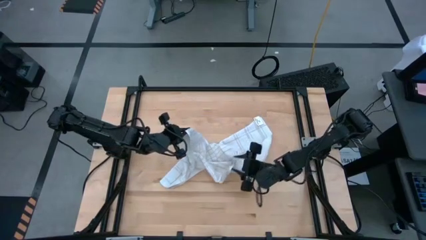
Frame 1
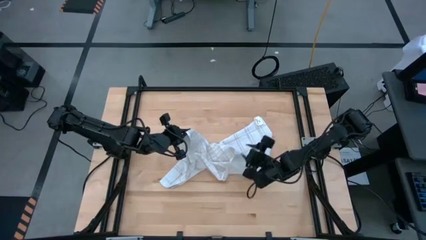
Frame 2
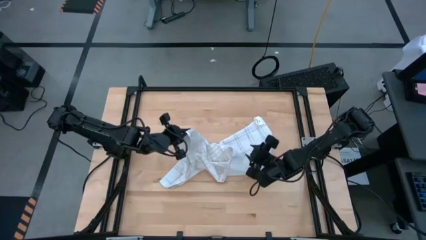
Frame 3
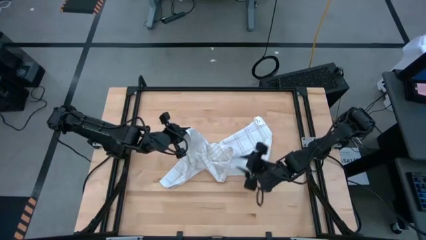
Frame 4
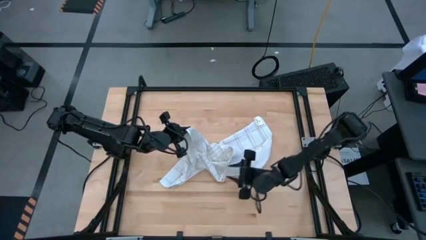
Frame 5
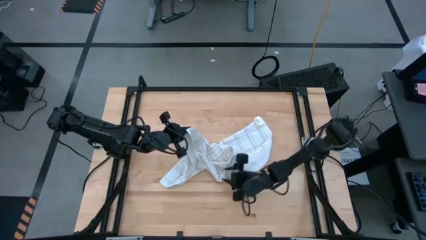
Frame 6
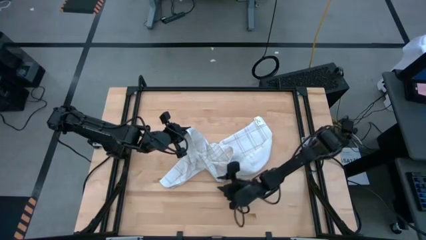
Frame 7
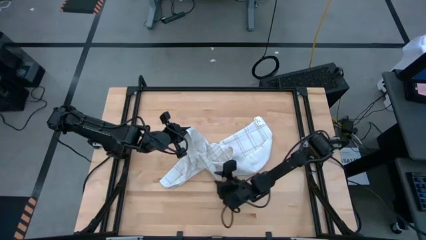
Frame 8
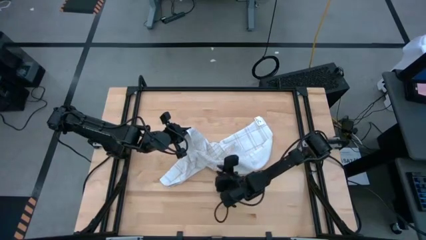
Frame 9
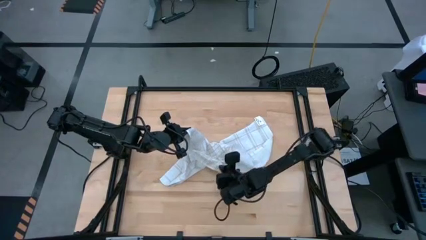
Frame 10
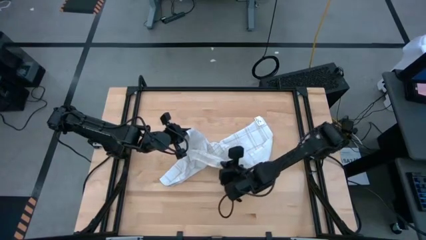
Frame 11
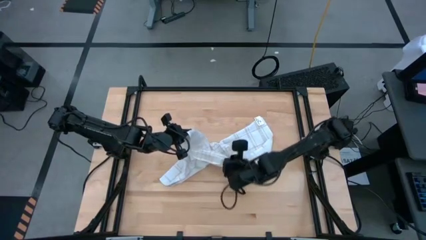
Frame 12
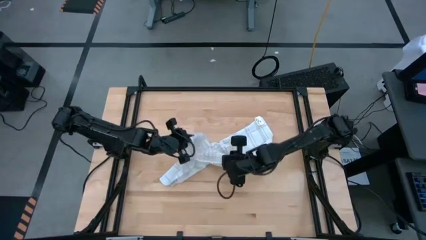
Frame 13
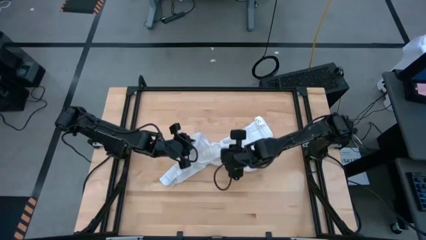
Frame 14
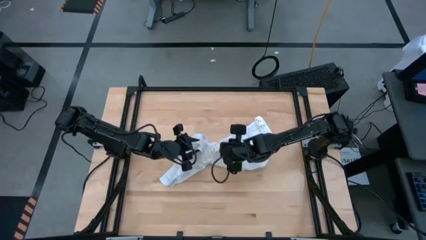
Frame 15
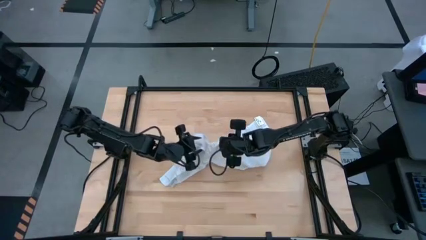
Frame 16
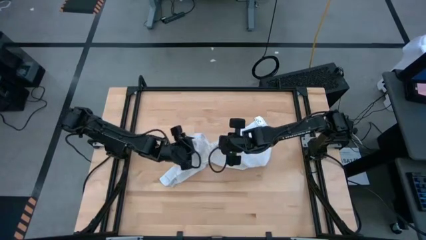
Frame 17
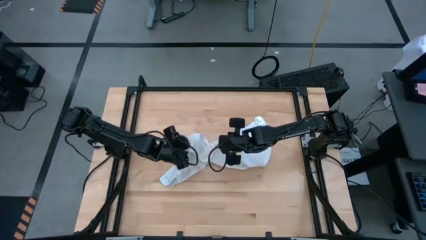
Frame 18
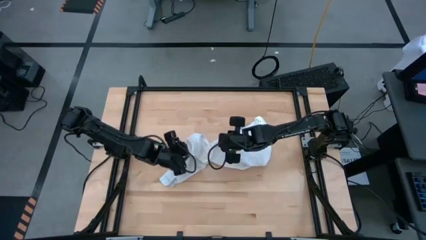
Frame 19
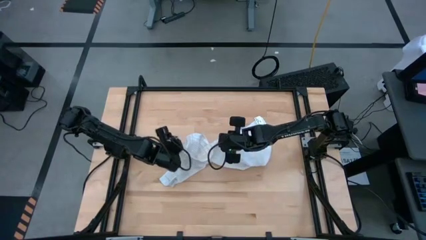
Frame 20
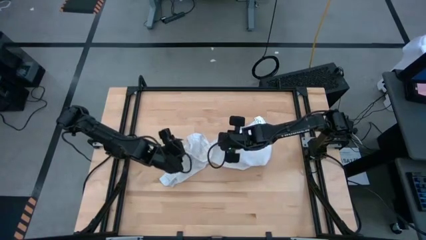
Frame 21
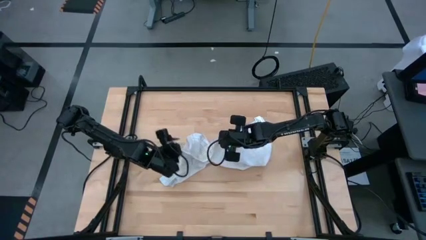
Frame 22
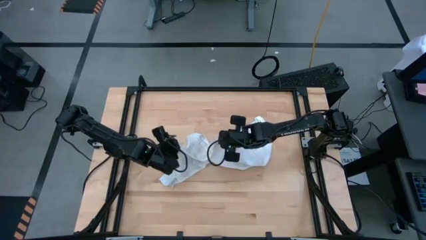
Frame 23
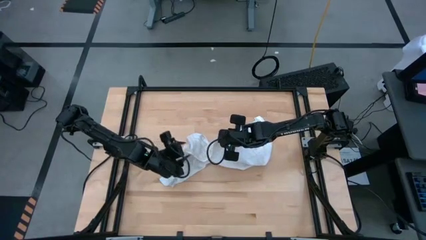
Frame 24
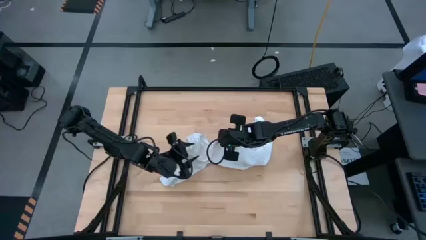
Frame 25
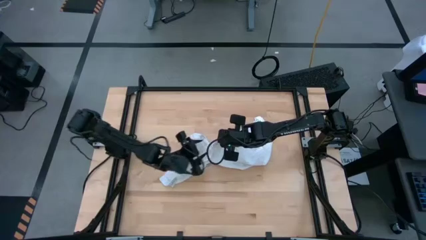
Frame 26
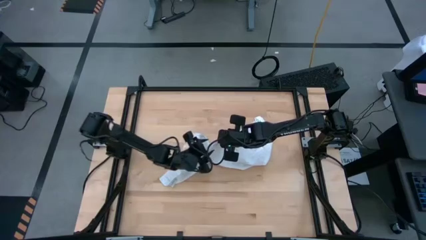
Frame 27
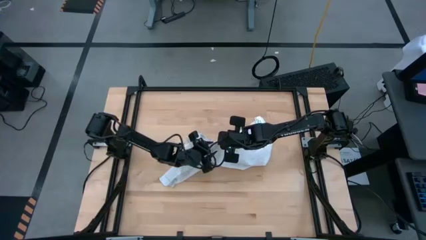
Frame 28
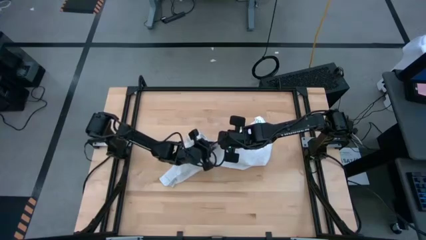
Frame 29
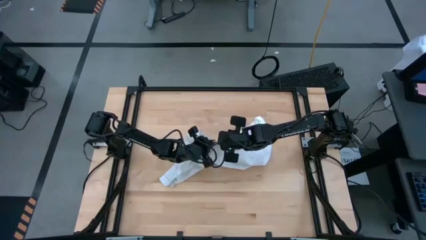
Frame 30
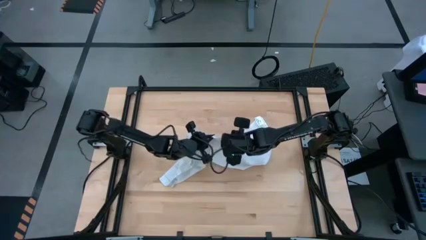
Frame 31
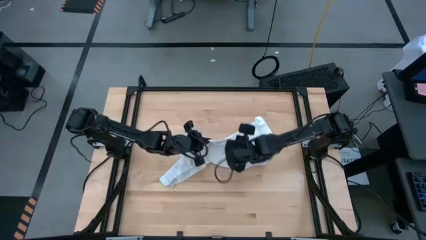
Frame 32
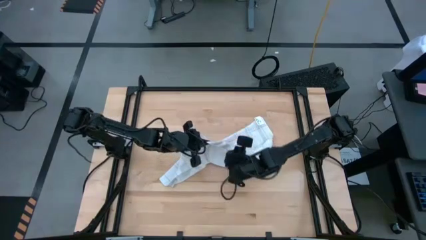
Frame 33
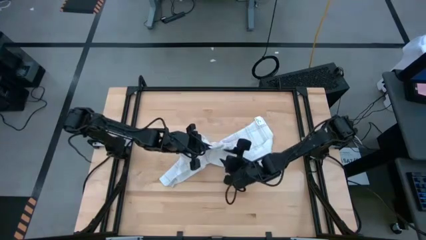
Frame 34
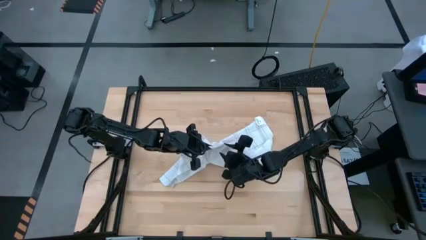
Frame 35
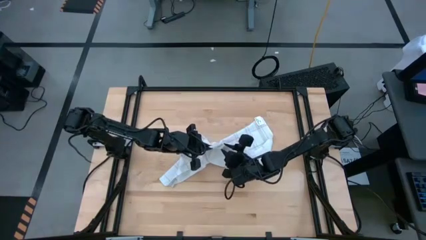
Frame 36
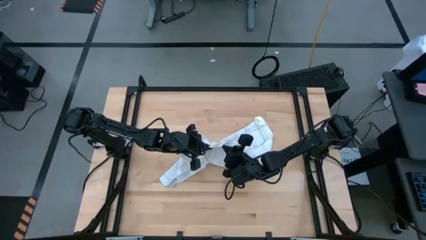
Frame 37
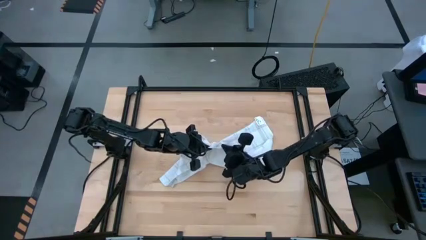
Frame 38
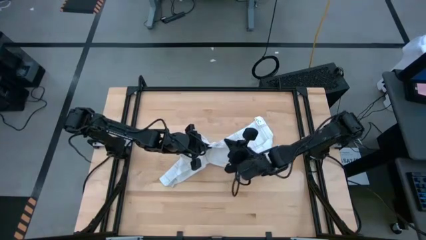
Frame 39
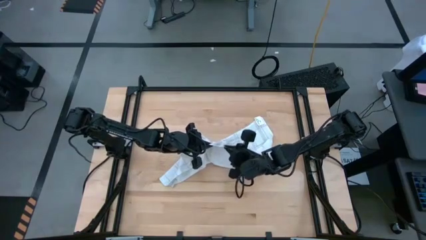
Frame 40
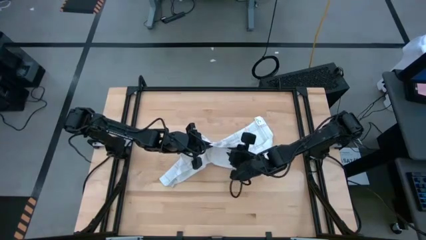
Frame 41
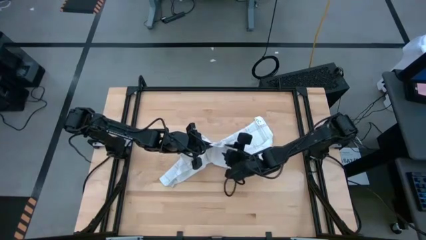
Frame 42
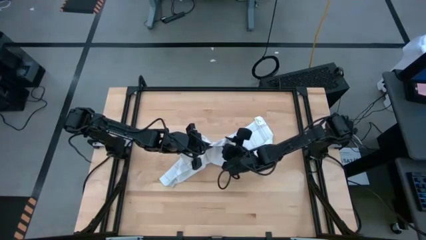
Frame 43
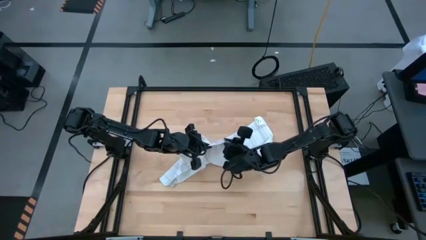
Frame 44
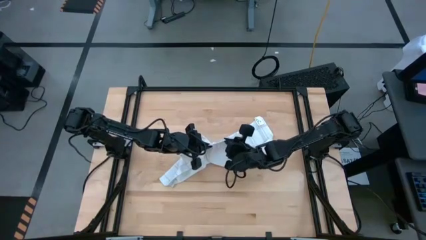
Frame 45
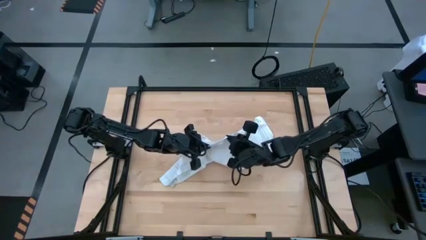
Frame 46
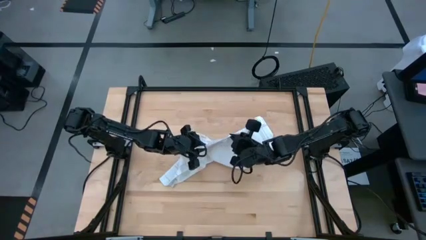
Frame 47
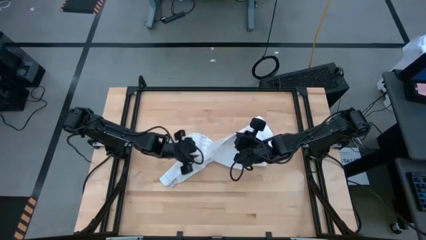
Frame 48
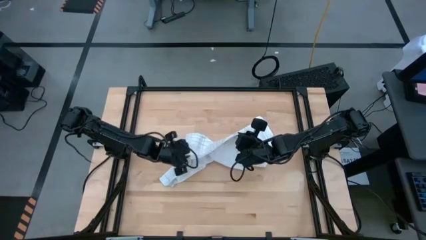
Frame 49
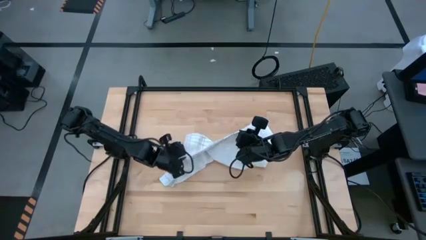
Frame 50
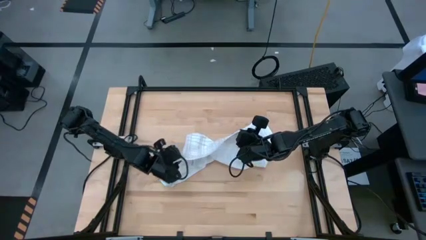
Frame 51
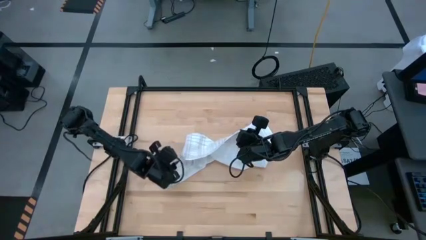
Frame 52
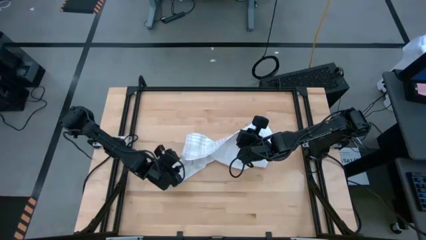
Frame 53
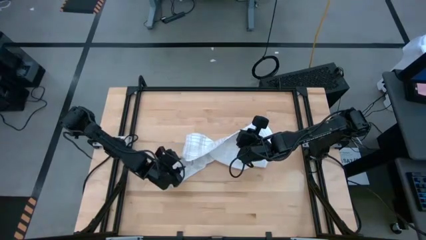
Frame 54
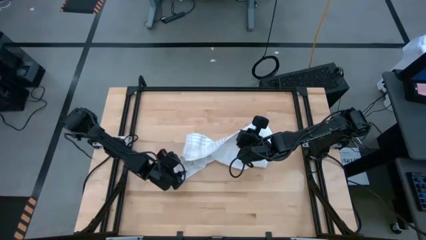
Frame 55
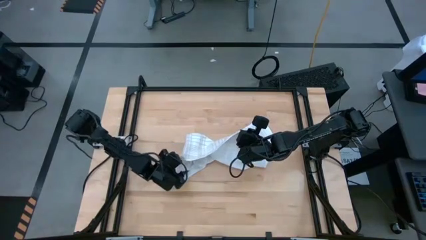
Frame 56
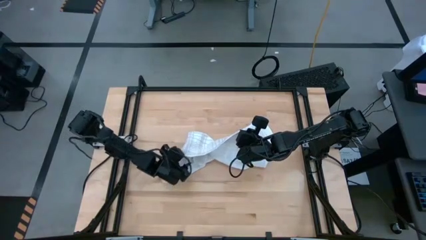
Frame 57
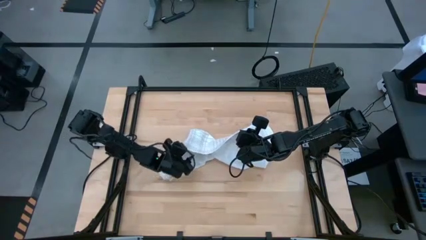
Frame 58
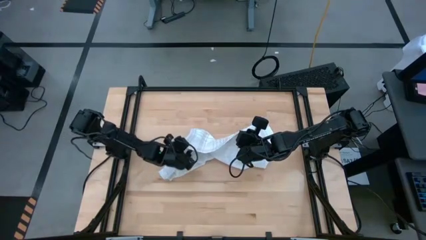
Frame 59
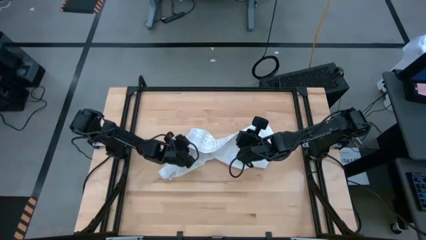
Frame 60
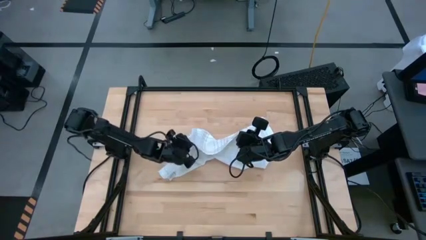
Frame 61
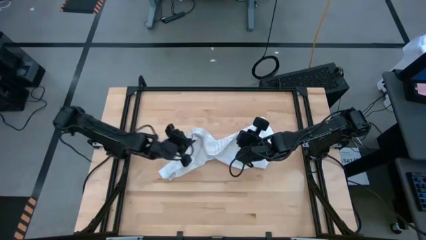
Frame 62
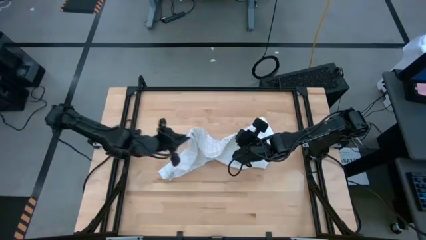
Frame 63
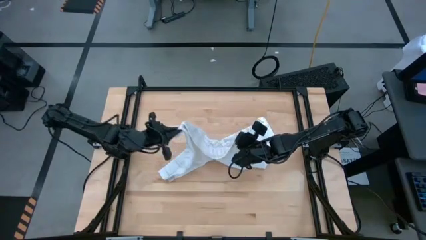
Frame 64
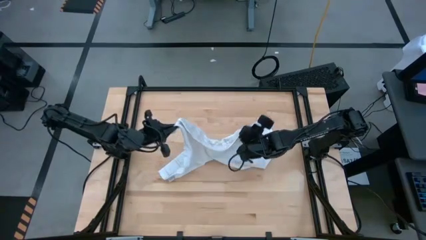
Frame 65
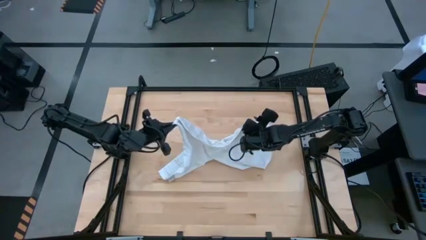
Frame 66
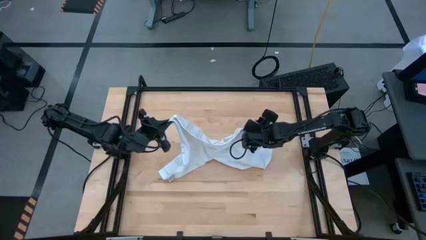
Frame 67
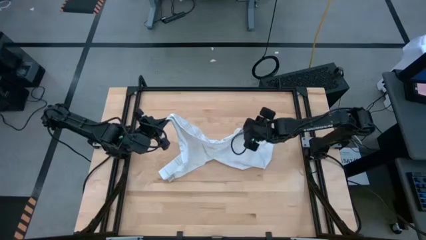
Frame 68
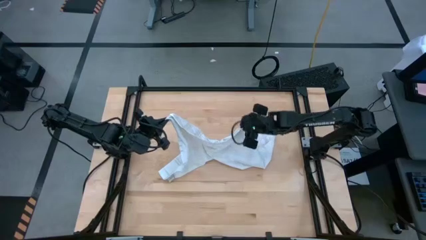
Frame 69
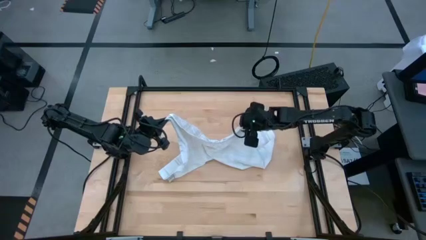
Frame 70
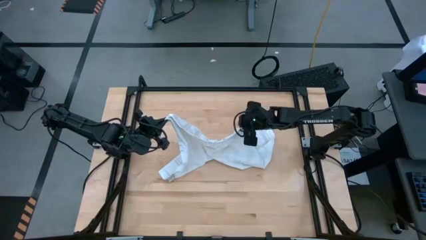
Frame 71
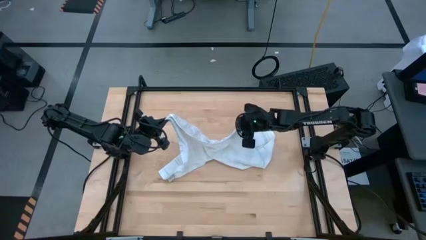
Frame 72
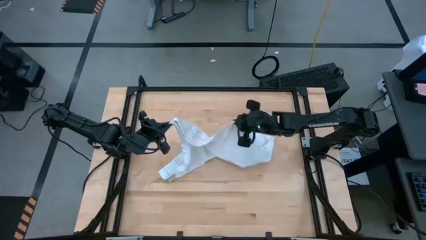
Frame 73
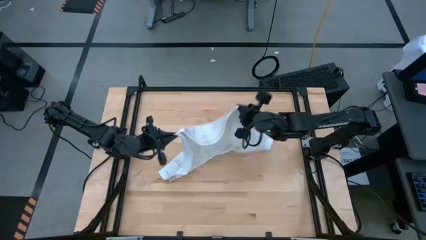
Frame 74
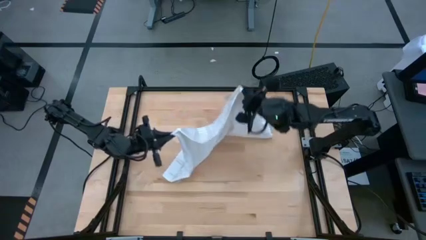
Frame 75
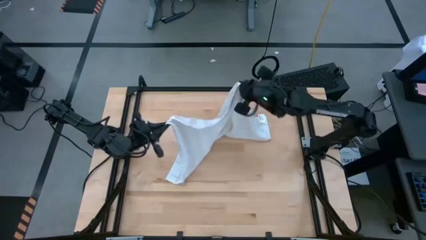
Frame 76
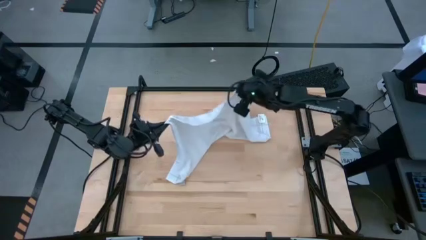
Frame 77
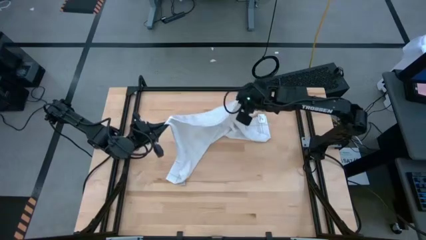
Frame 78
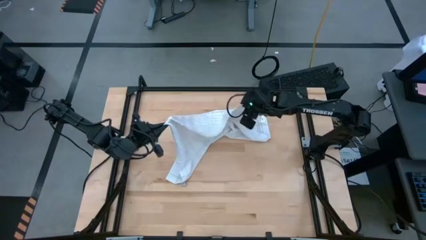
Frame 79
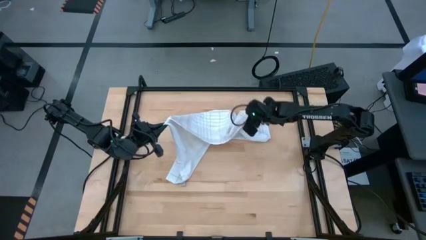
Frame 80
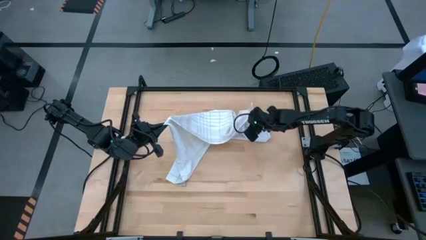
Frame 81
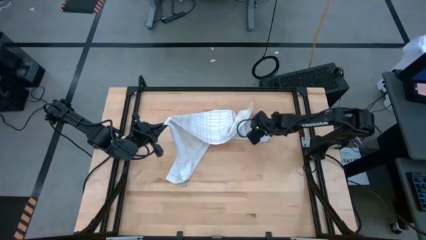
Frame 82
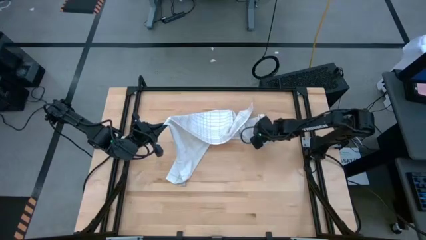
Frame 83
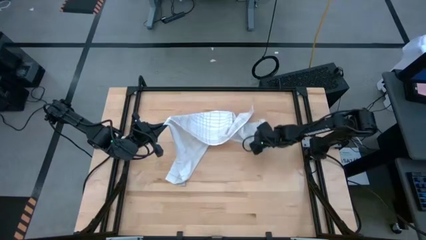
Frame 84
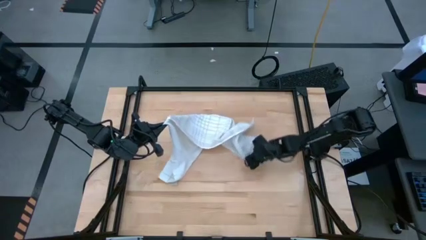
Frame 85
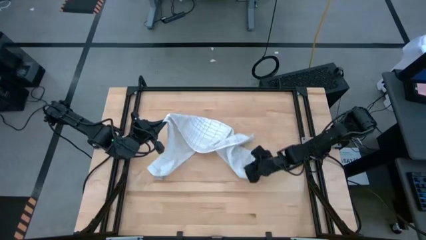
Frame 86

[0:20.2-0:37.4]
Task: Roll towel
Fold the white towel

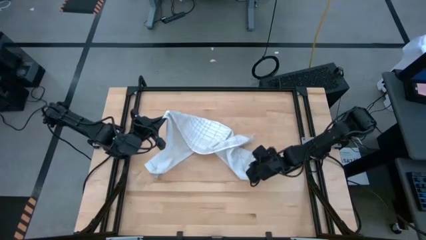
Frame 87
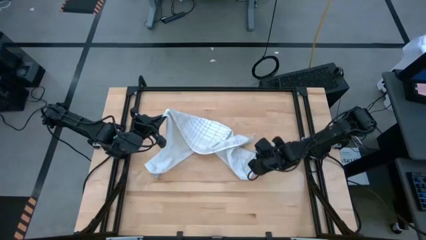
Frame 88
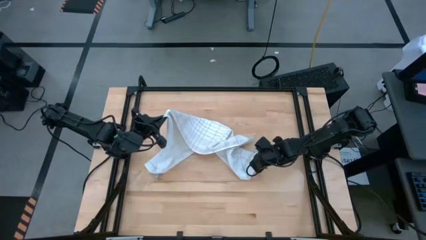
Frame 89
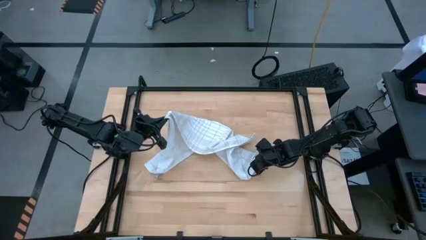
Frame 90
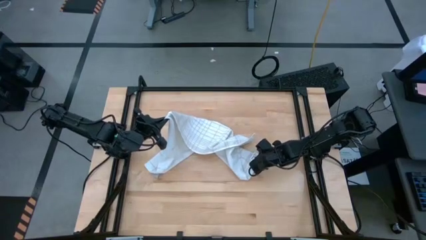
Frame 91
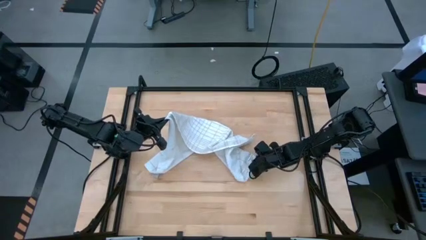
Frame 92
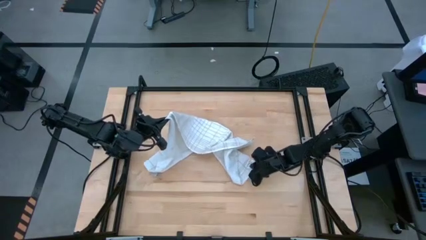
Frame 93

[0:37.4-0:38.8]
Fold the white towel
